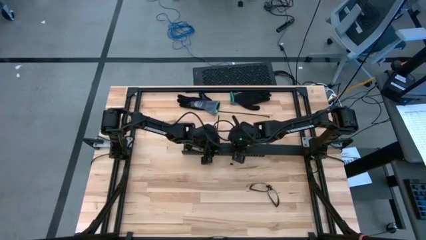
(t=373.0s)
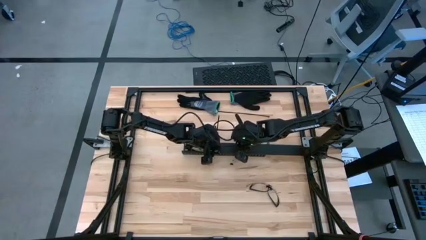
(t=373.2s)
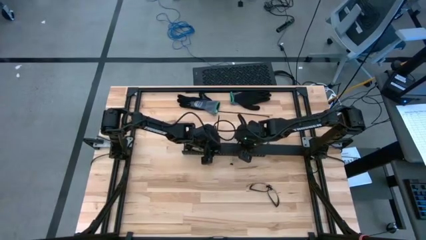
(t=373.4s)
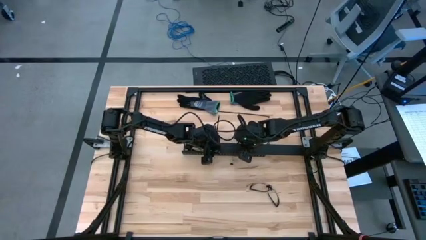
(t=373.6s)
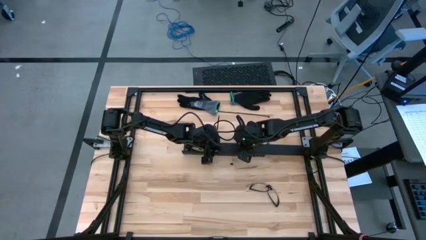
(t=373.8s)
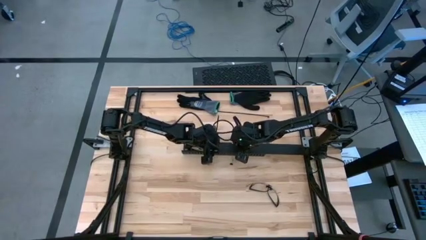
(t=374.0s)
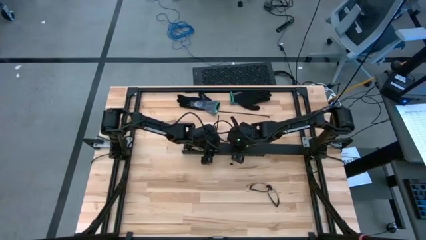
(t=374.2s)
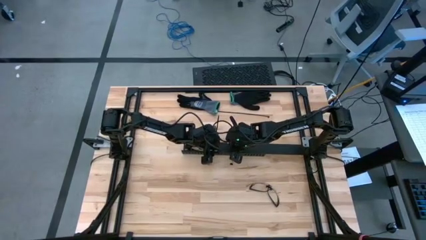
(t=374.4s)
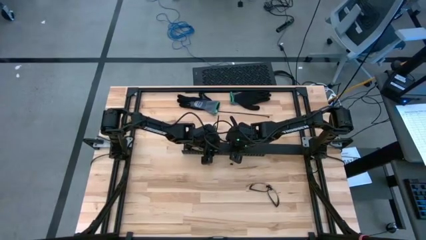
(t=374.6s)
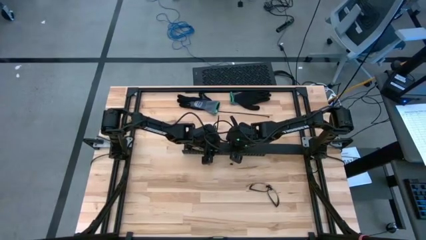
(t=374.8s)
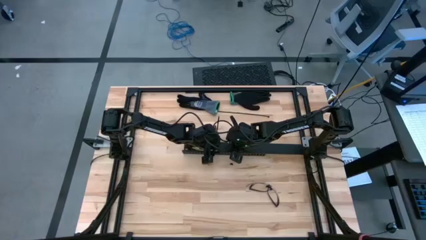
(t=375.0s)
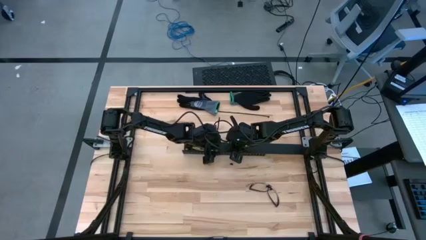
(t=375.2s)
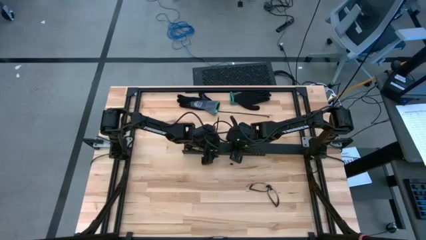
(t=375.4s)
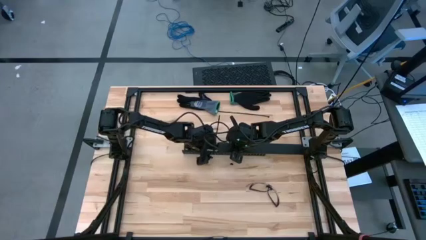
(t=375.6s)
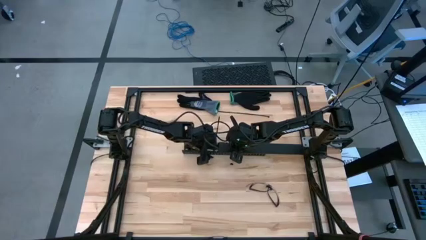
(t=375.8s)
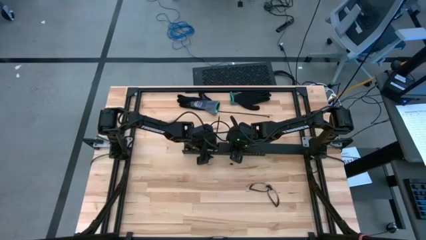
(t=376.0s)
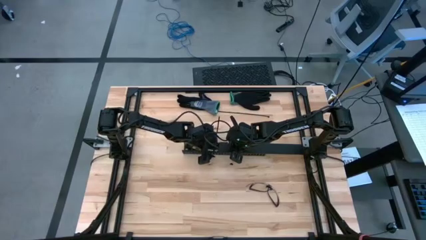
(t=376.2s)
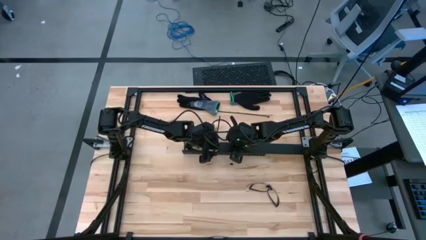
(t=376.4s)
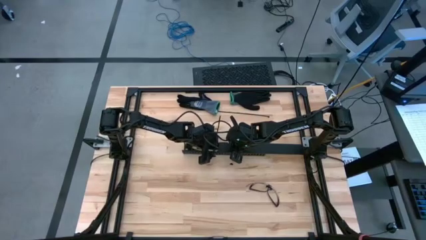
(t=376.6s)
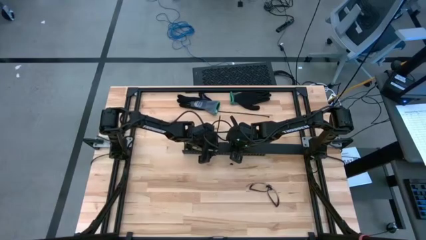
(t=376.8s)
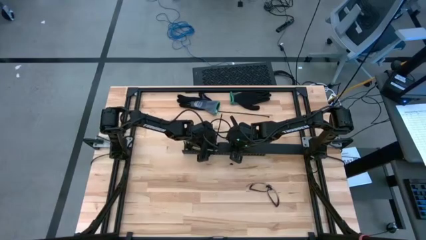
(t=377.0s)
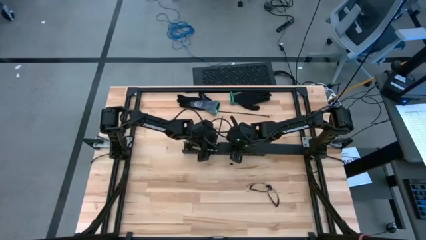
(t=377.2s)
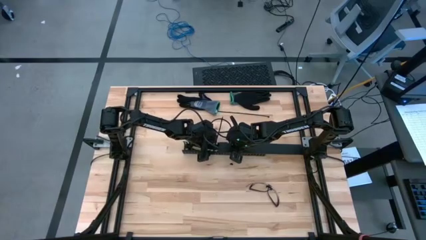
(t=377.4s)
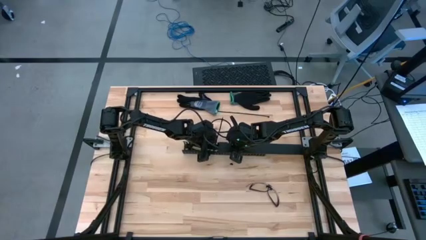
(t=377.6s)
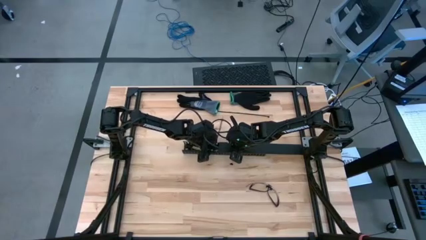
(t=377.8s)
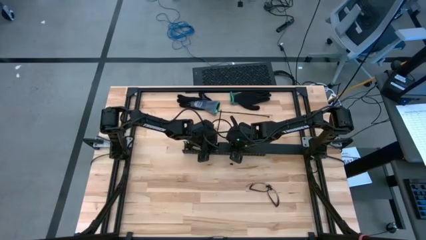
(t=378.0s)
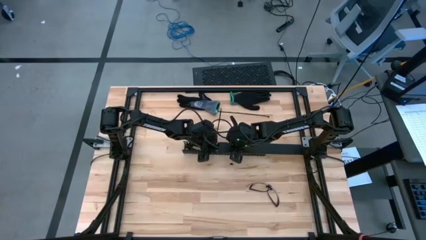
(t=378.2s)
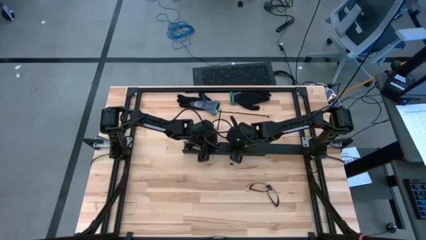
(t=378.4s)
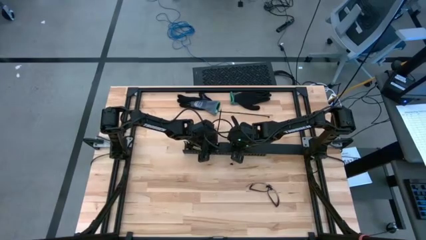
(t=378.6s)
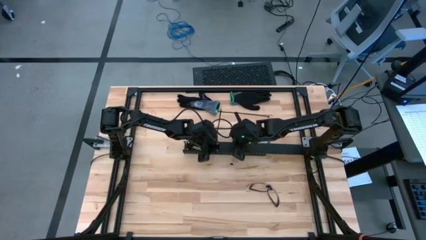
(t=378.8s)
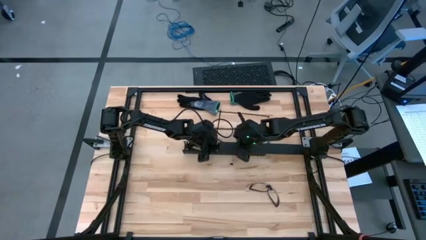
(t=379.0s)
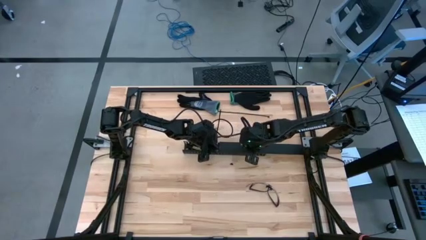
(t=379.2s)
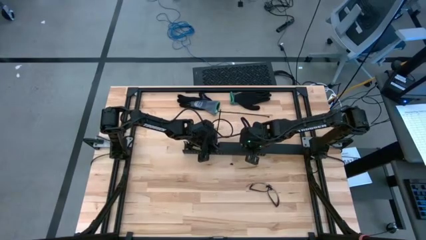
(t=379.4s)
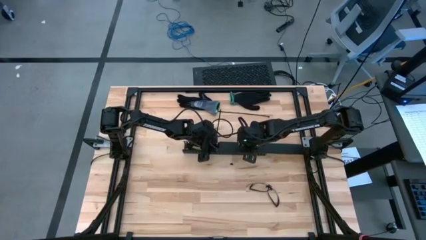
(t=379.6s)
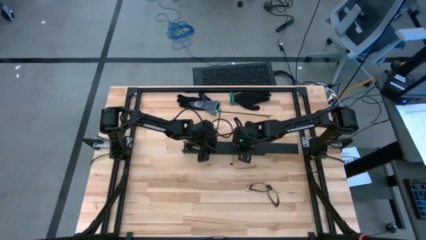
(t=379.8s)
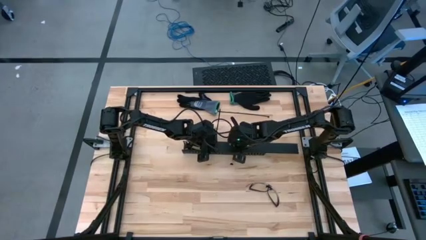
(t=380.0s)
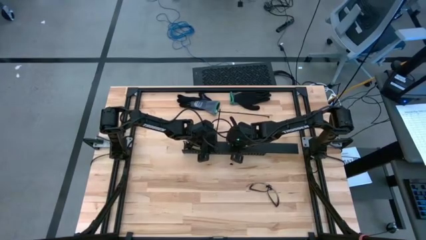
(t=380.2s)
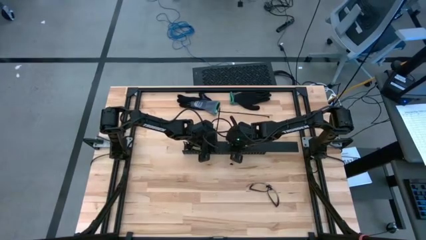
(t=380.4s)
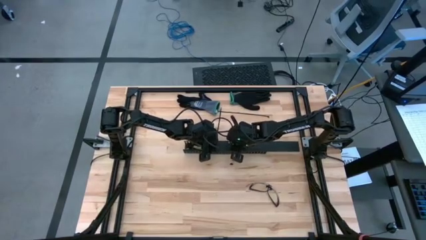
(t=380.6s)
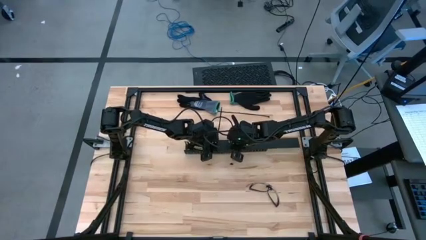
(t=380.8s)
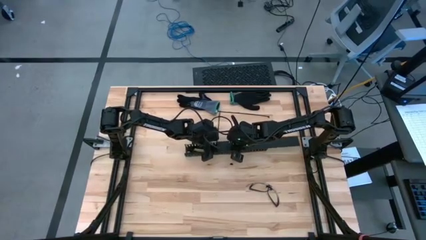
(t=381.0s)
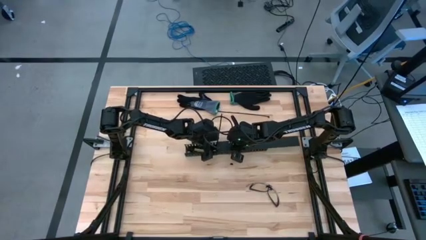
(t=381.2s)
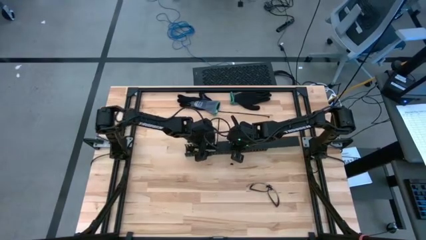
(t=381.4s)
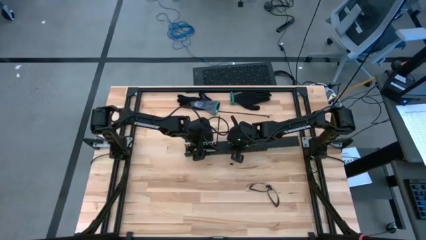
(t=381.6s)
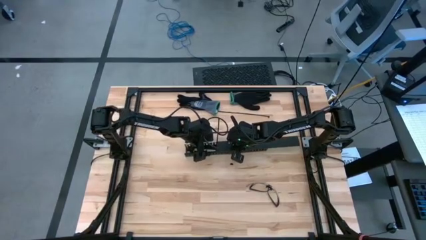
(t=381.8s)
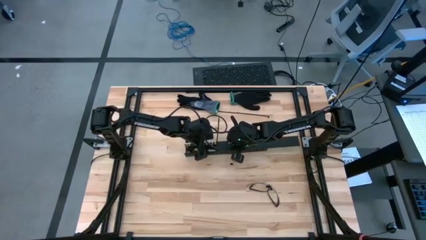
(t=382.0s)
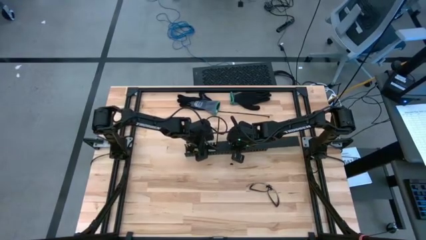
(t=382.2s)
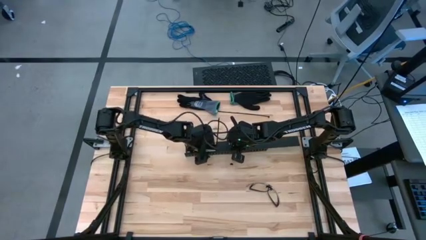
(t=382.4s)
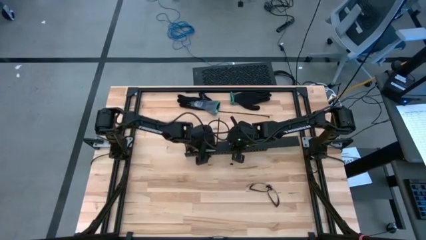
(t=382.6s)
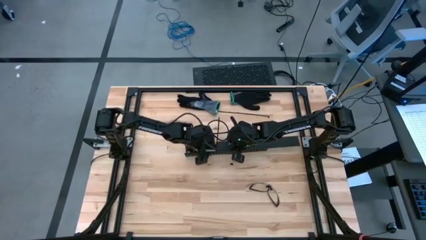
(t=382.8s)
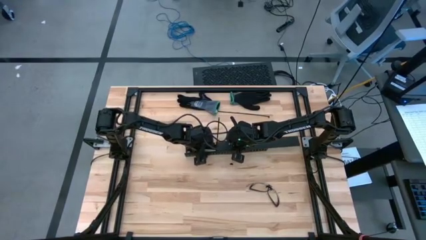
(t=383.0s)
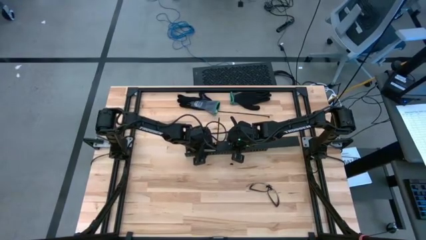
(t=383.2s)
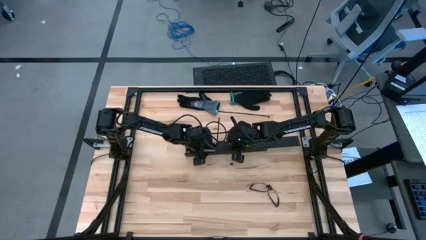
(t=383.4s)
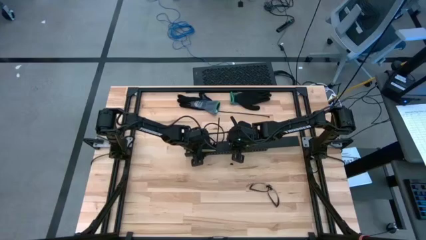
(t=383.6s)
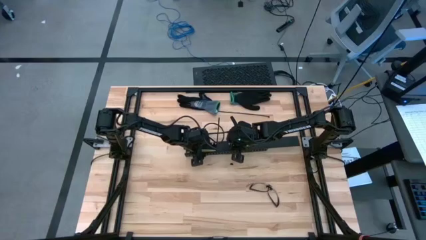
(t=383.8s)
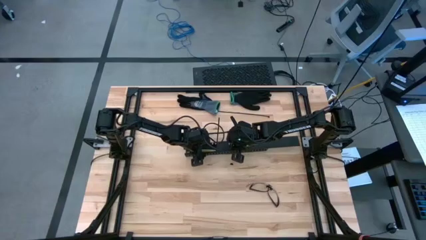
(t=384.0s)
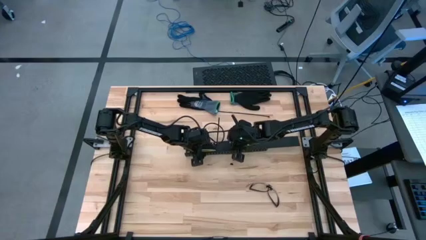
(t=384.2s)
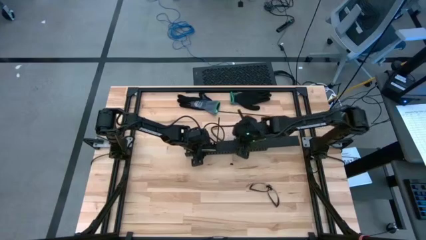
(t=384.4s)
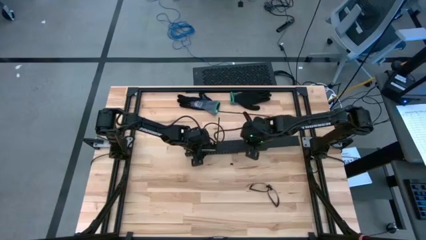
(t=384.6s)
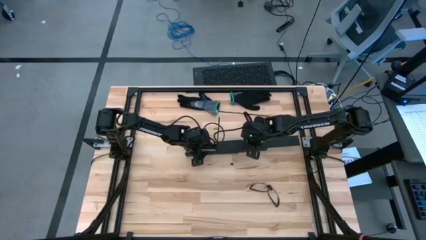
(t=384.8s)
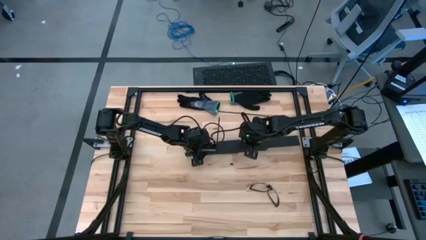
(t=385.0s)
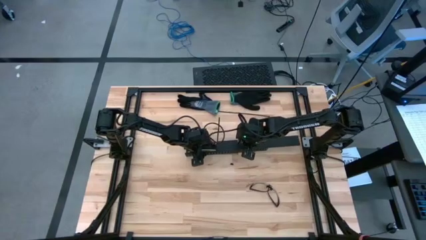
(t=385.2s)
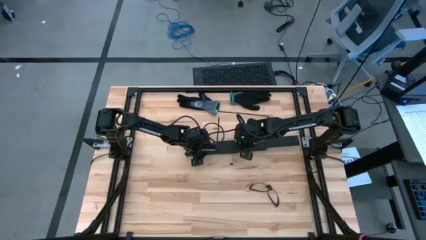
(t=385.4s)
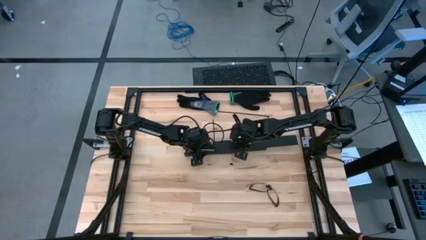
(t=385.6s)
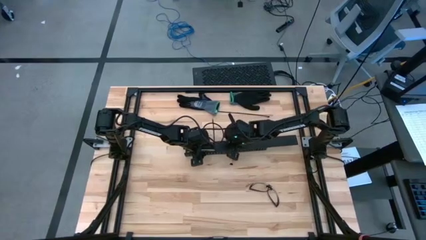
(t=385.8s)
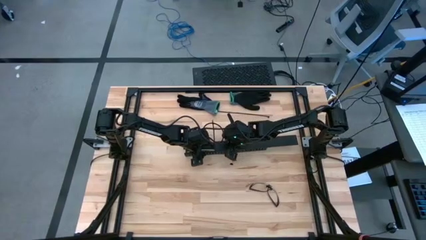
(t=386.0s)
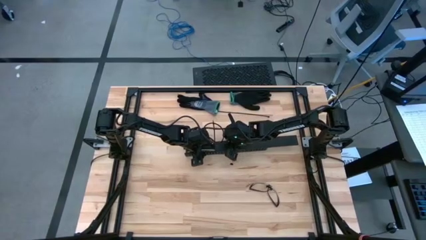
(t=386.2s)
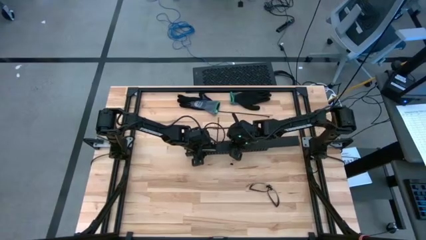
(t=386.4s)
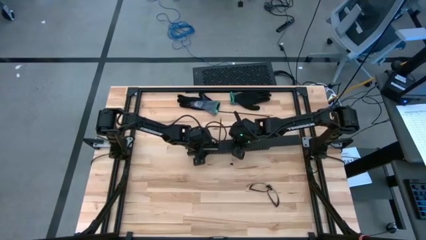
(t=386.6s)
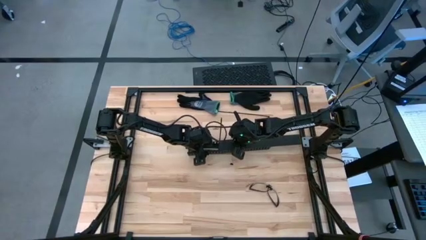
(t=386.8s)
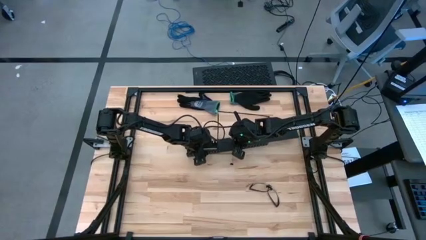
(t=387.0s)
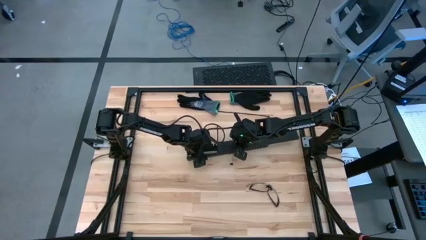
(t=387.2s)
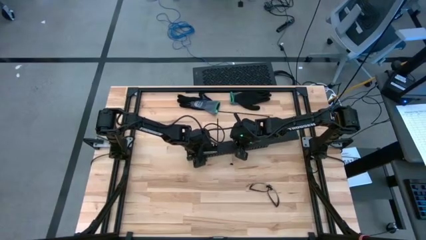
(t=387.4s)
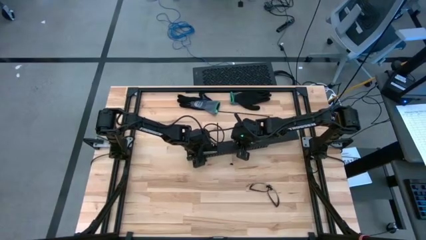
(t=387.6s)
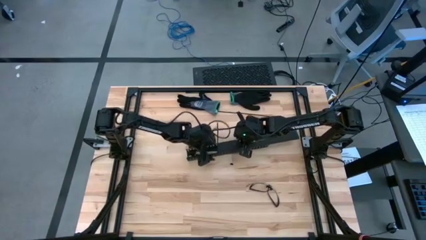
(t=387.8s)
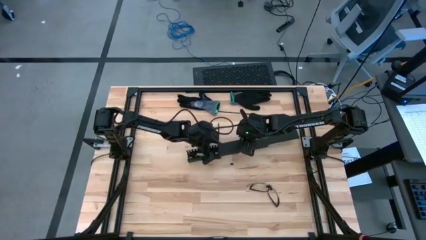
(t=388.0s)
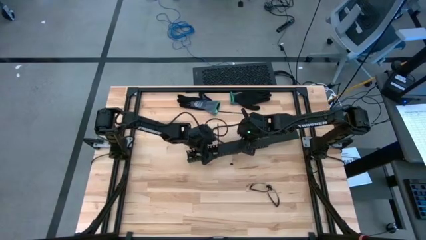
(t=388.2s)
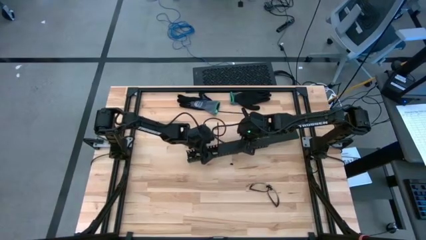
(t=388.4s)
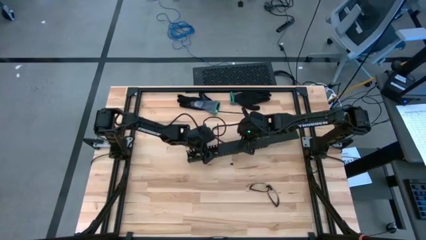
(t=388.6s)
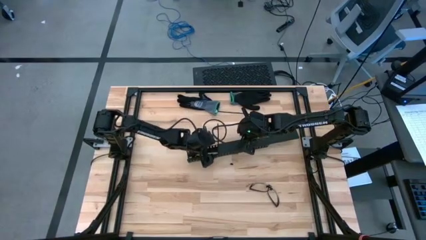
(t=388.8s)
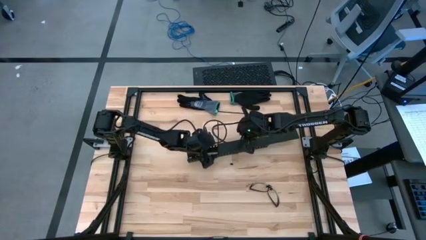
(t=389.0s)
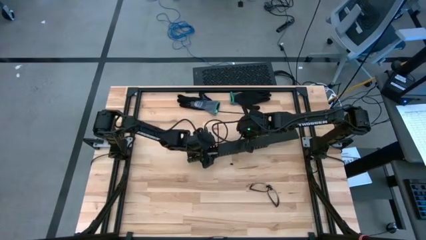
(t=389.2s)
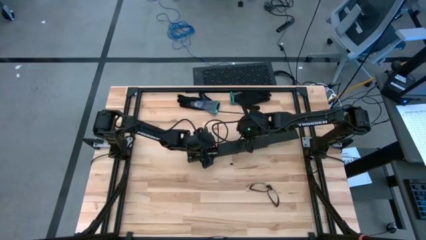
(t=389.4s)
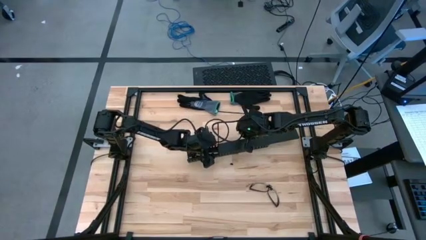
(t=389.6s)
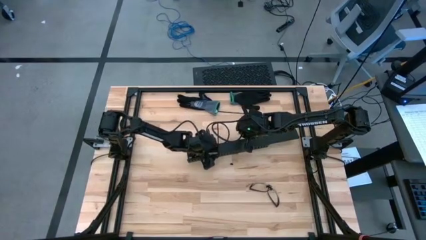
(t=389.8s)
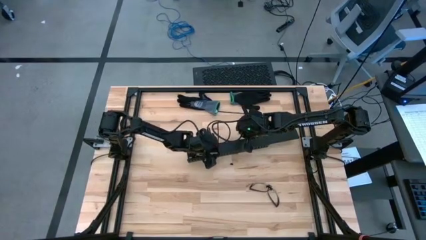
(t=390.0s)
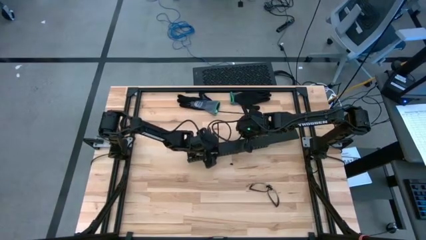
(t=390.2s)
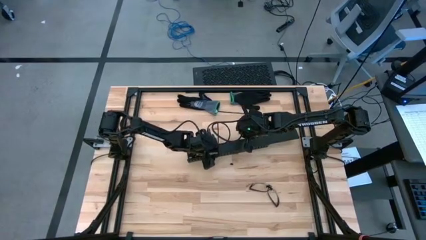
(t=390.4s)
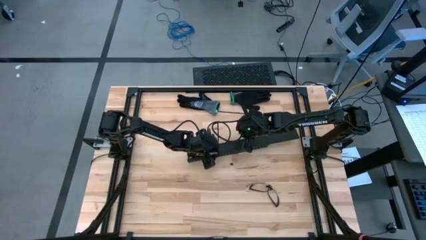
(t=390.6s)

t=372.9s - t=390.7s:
Task: Ziptie cables
Close the black cable duct
